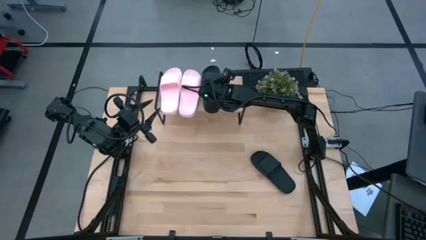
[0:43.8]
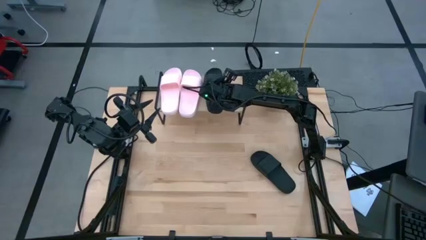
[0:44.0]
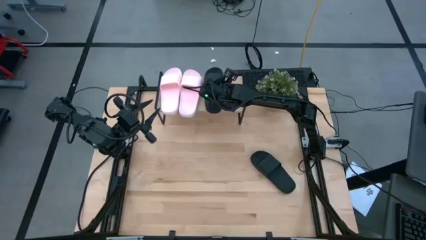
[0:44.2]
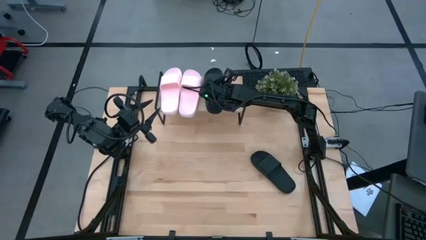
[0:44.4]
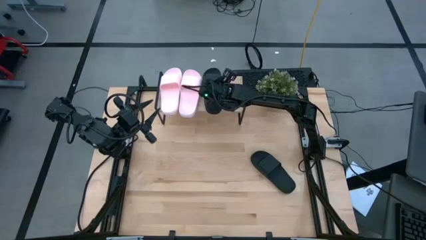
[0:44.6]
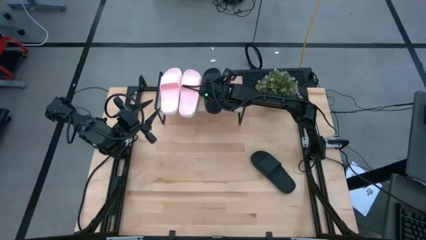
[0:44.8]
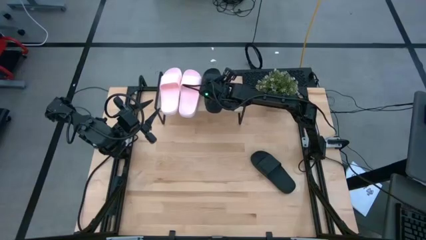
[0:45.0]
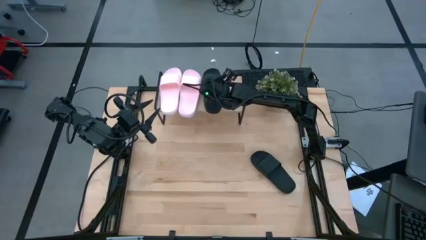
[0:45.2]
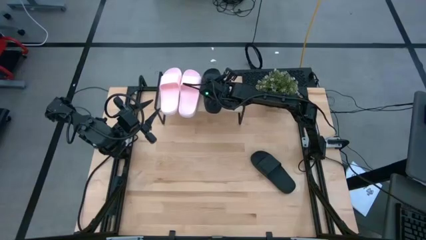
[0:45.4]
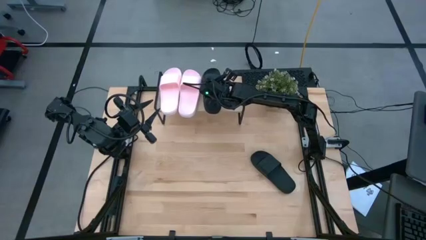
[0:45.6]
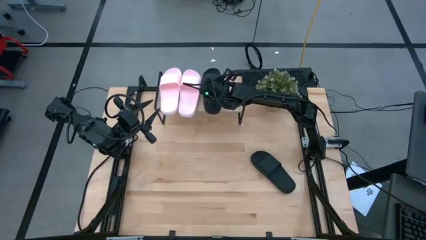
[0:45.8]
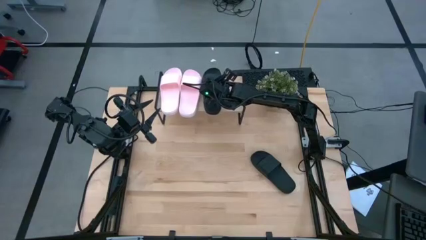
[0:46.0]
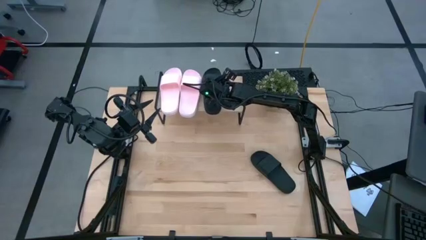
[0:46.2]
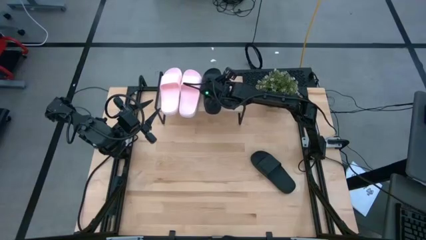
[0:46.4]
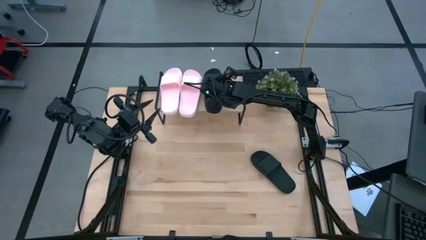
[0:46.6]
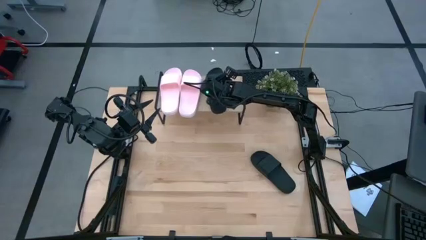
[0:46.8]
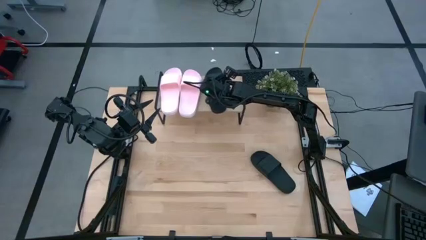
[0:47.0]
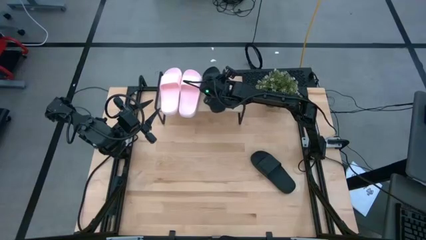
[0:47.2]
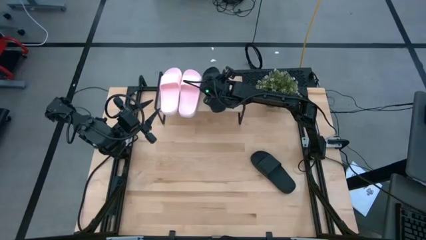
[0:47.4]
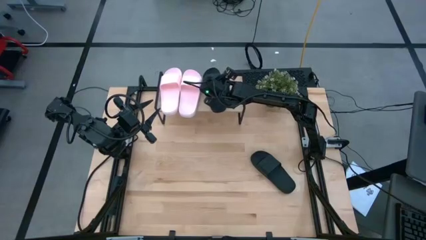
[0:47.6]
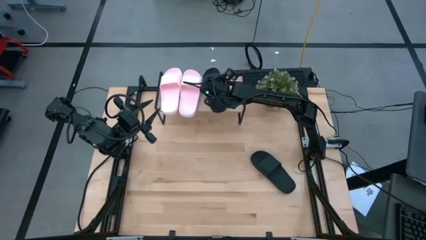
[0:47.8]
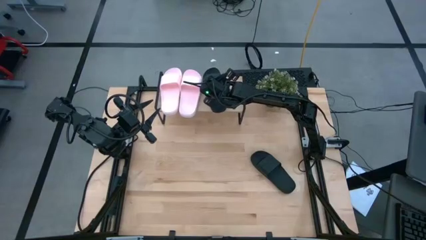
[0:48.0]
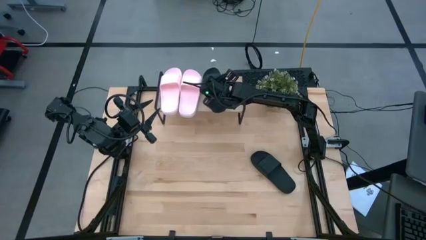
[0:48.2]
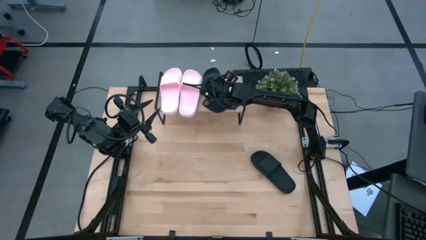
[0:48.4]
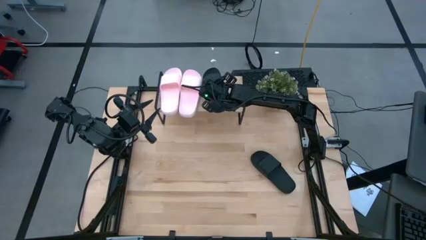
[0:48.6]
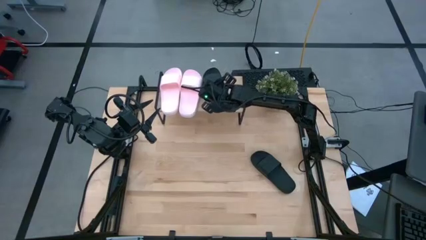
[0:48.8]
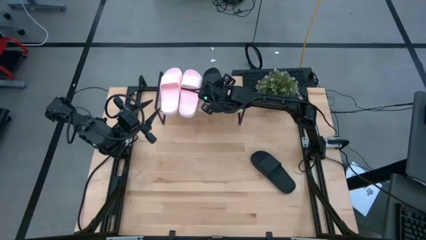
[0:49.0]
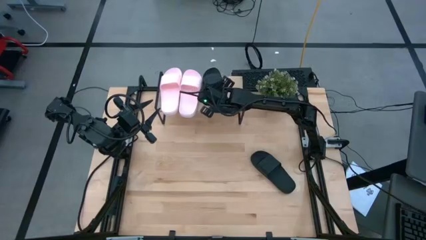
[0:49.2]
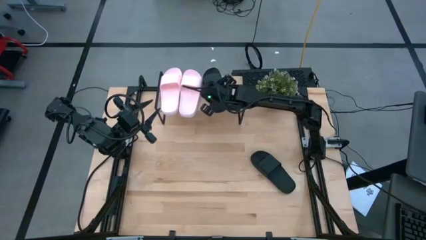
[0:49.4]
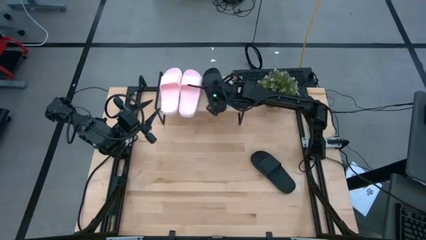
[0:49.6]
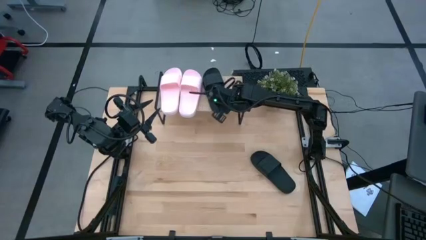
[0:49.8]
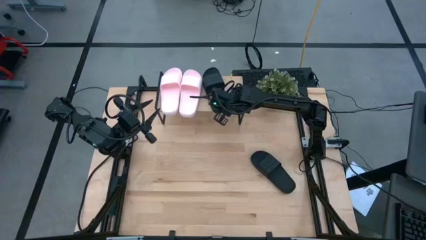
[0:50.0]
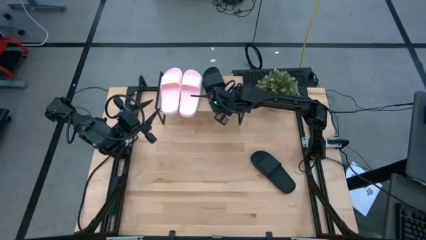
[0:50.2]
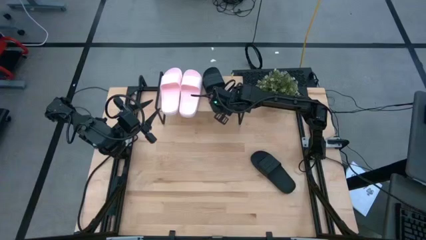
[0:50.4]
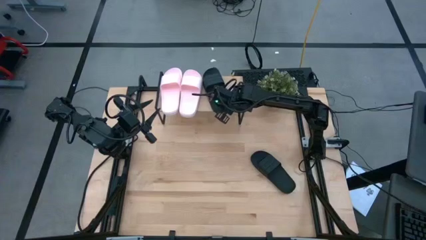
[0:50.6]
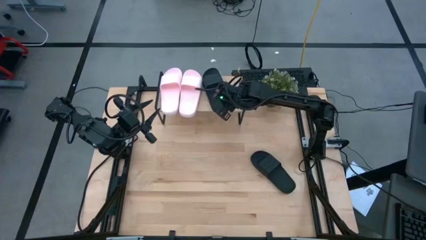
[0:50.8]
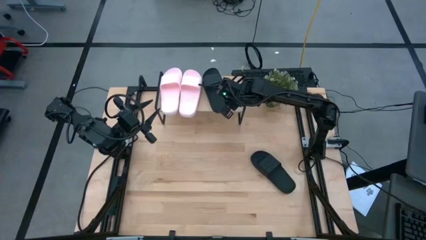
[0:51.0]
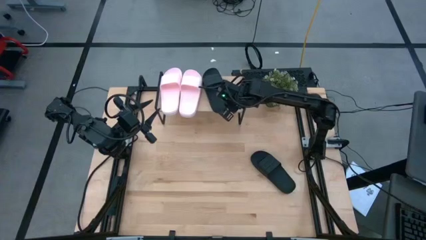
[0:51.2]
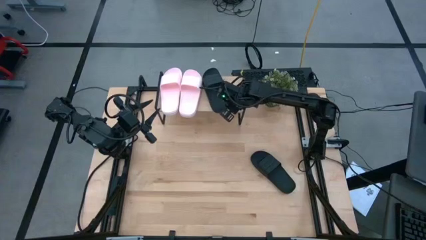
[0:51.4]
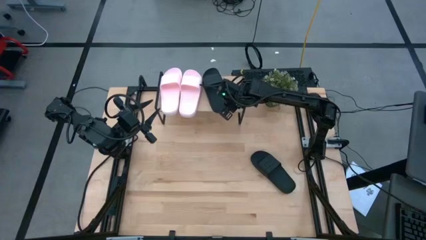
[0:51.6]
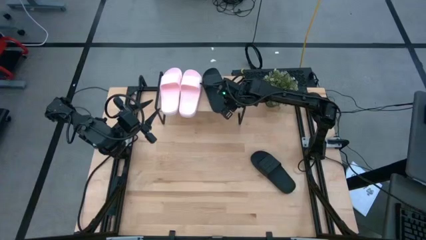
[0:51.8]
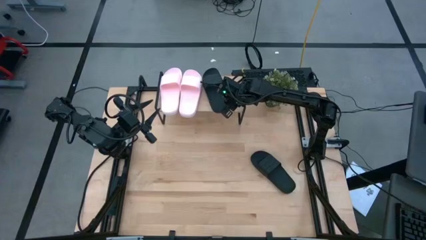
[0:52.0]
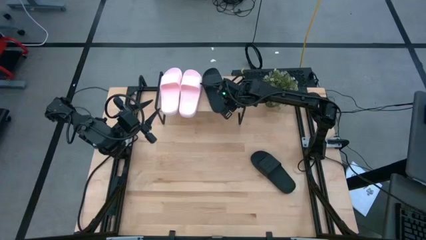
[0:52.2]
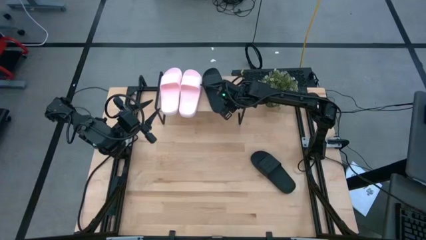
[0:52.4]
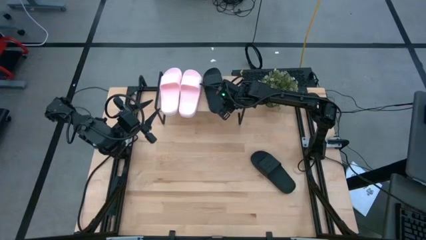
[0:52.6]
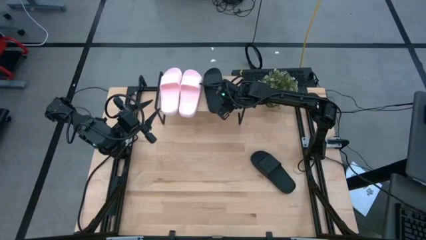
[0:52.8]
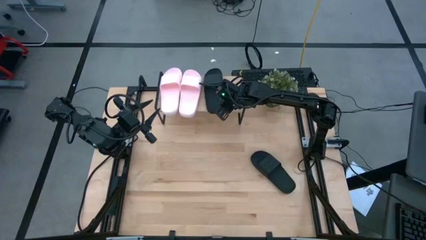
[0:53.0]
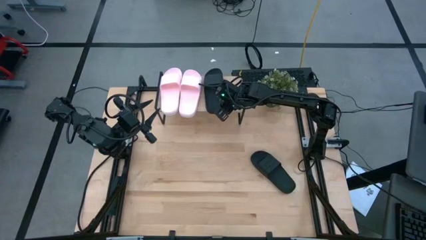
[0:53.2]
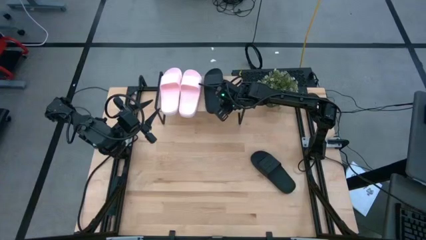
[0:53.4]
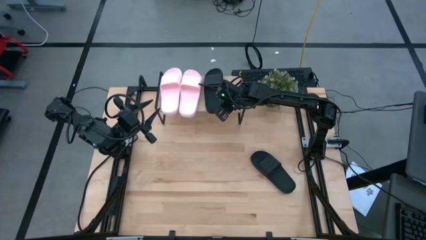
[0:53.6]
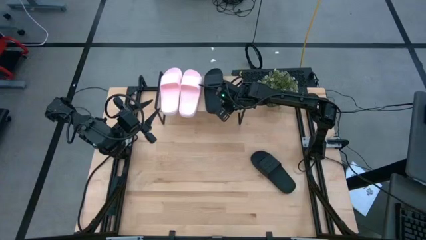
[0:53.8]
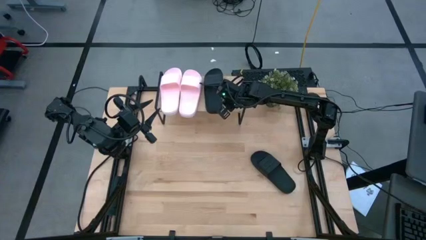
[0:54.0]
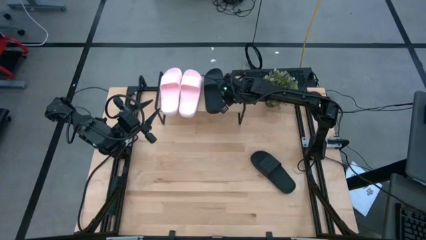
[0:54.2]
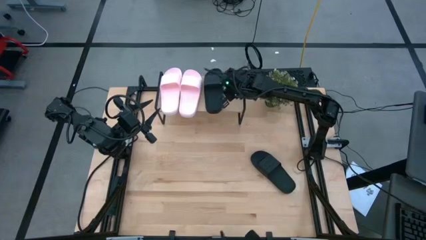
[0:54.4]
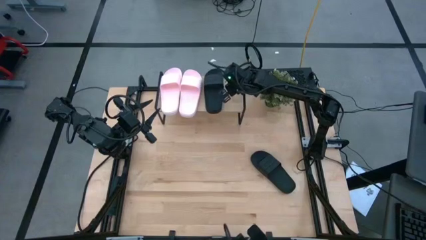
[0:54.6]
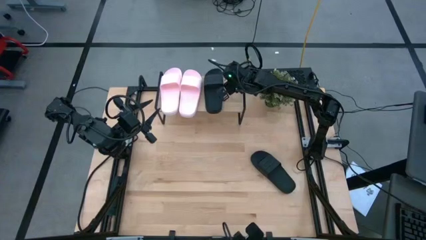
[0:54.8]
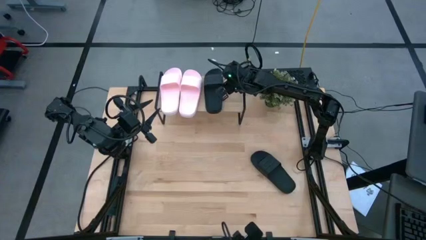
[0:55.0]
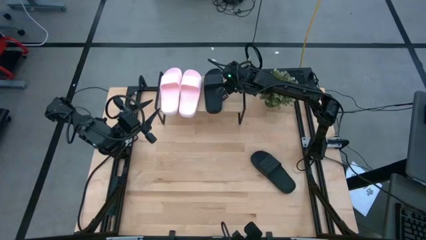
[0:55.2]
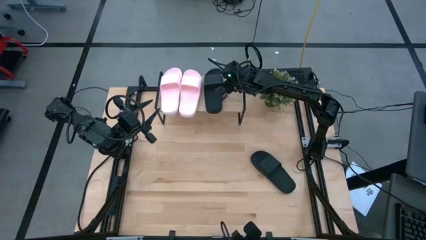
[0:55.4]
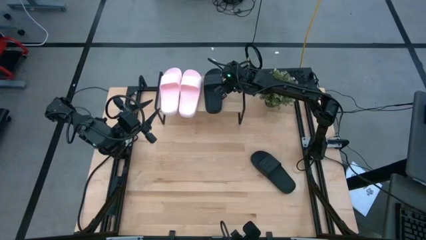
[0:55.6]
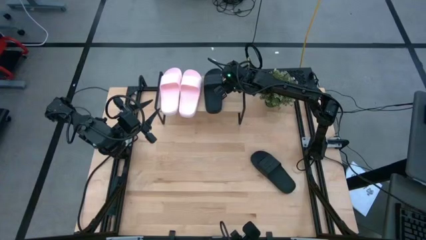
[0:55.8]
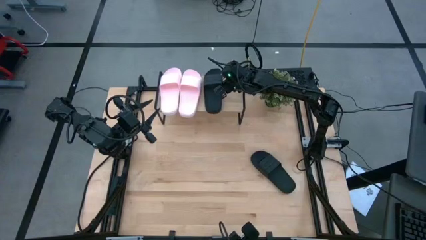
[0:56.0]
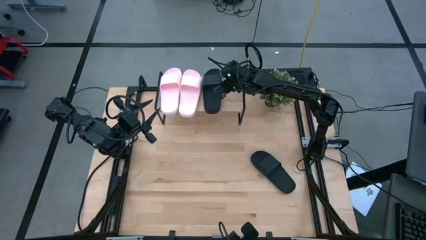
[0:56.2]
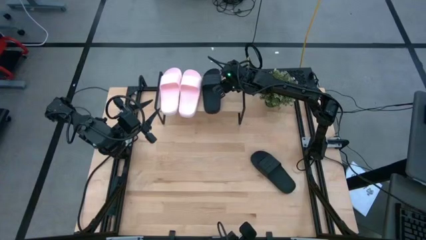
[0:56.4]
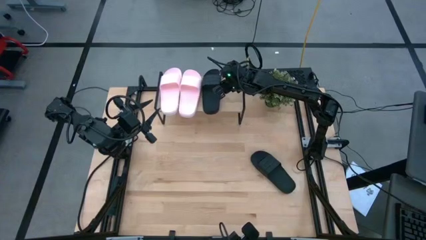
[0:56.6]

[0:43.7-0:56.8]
Task: Pick and place slides into the shelf
Put the left black slide on the shelf

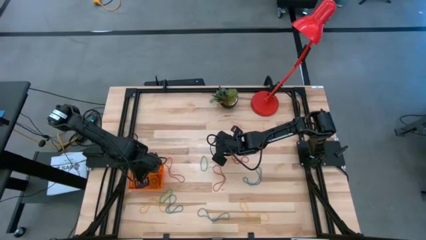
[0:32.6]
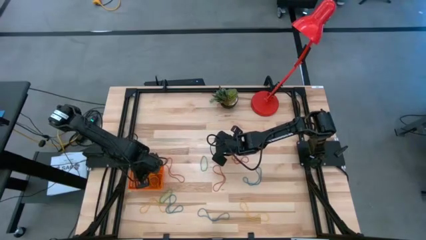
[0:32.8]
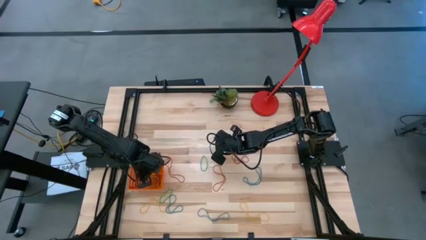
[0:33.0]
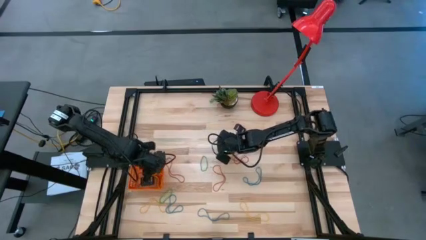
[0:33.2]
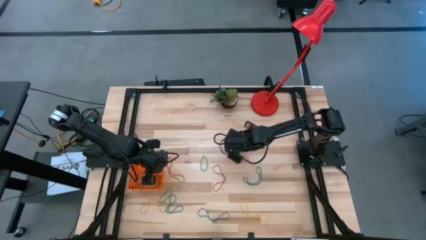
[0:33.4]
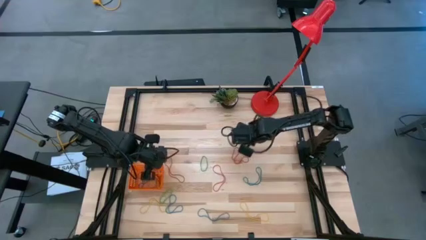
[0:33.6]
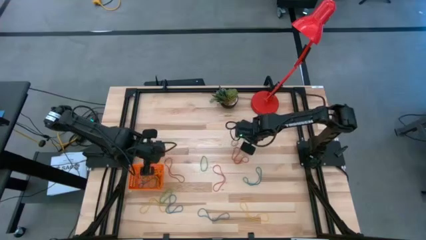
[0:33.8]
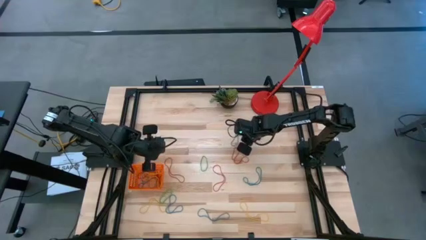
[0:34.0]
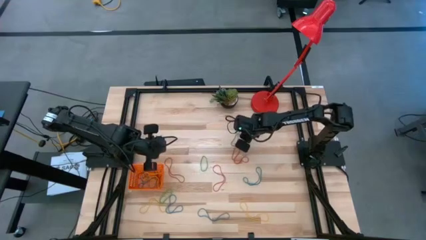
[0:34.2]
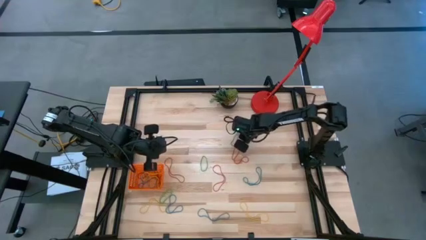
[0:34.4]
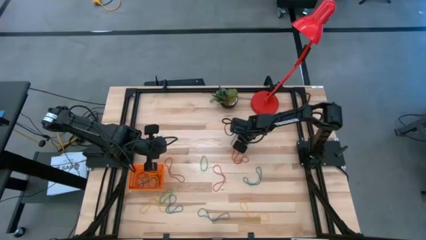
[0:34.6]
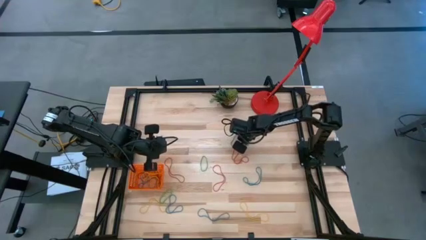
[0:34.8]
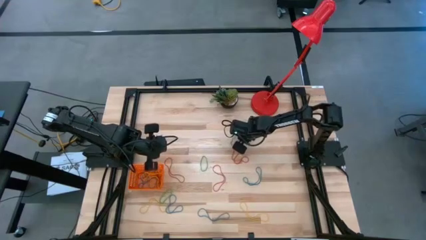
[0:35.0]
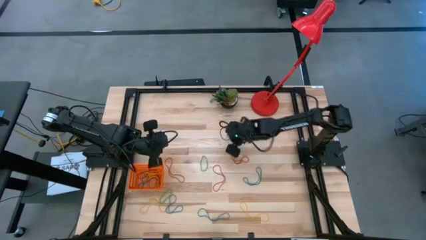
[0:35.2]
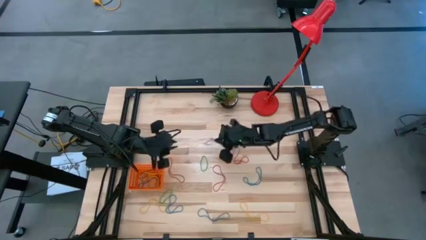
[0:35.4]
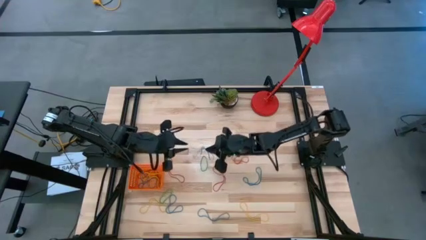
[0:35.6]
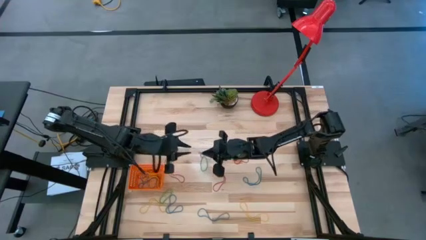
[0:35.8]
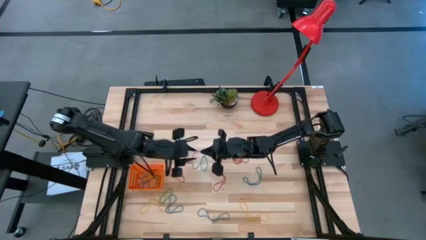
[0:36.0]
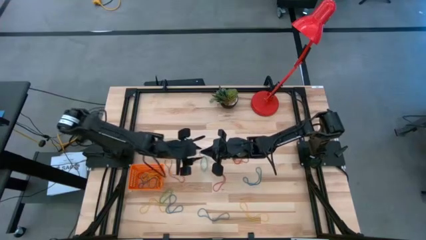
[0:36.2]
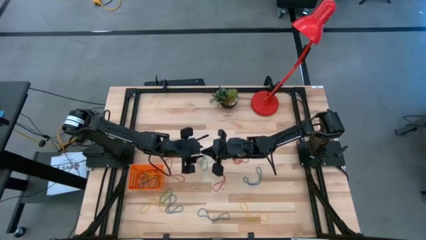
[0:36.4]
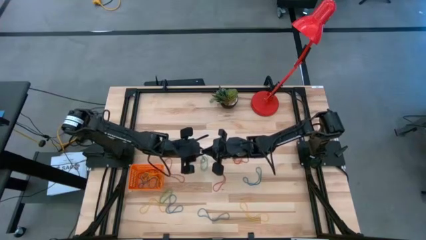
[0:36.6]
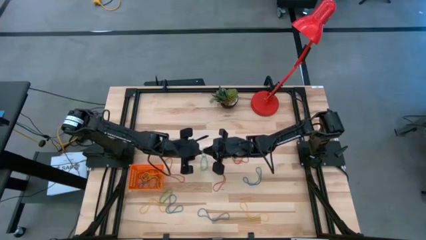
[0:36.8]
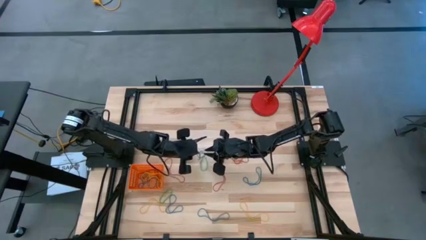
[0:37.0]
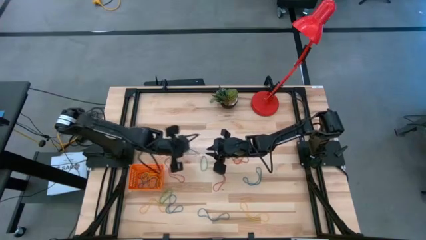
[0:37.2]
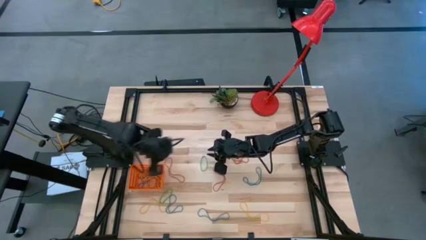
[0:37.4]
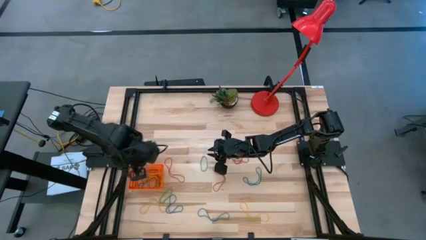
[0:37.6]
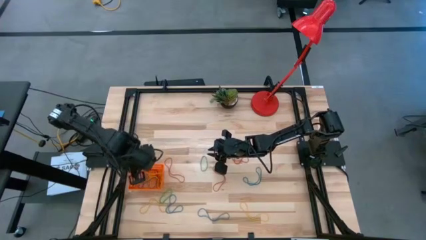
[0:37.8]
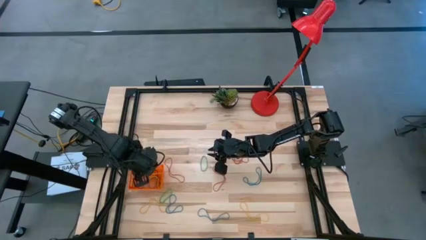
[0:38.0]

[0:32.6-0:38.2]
Task: Pick and place rubber bands into bin
Put the blue rubber band into the orange basket
